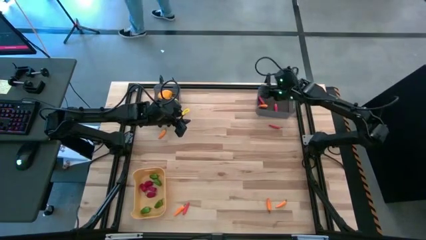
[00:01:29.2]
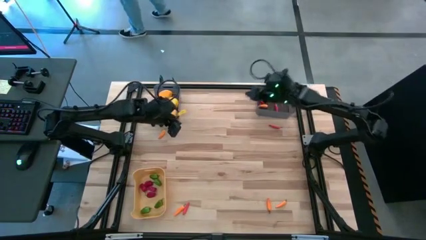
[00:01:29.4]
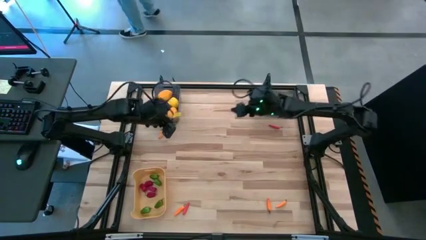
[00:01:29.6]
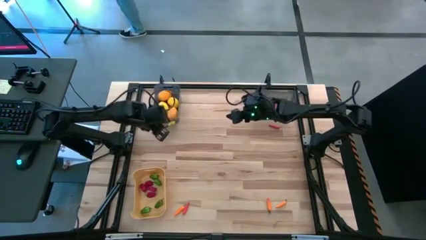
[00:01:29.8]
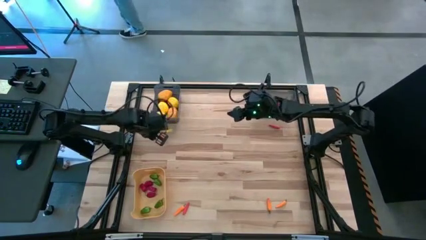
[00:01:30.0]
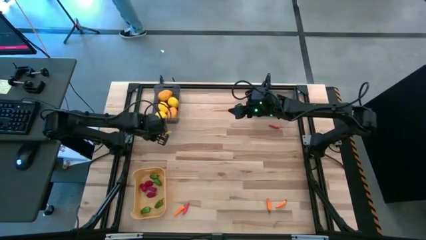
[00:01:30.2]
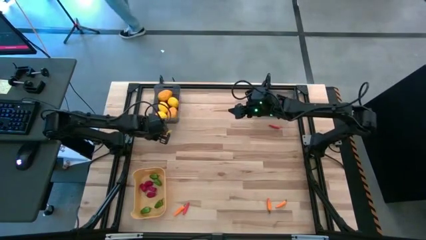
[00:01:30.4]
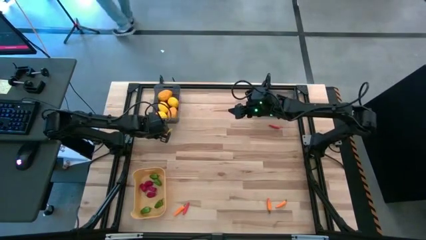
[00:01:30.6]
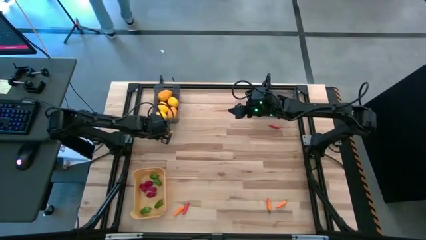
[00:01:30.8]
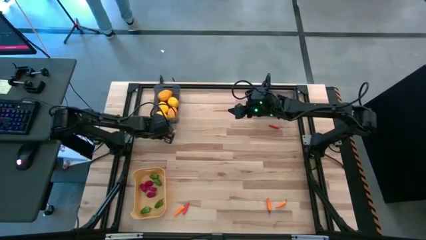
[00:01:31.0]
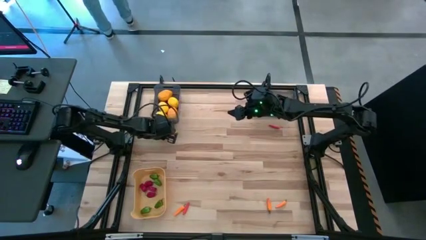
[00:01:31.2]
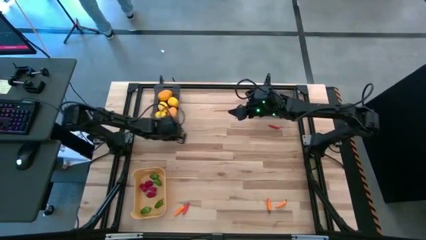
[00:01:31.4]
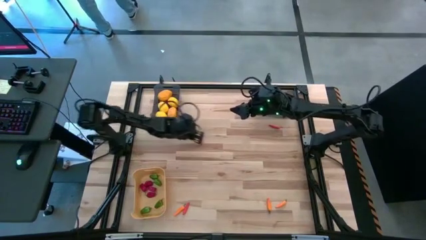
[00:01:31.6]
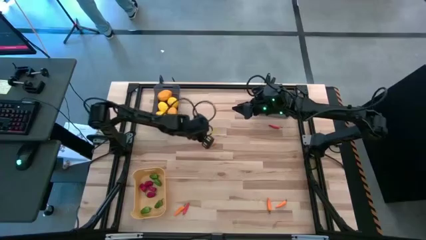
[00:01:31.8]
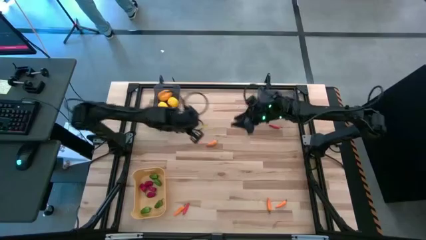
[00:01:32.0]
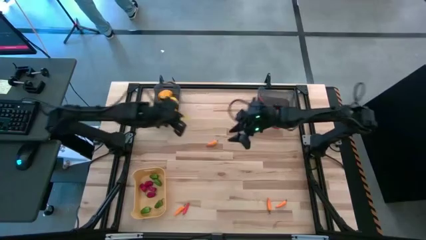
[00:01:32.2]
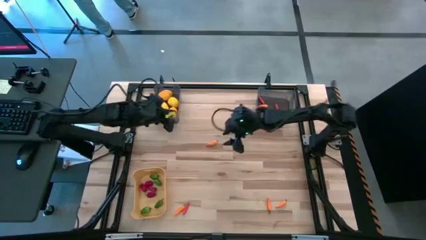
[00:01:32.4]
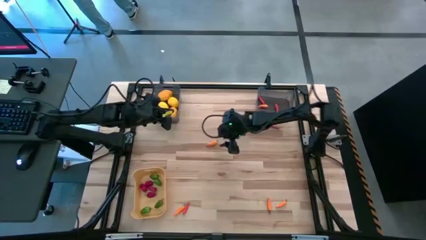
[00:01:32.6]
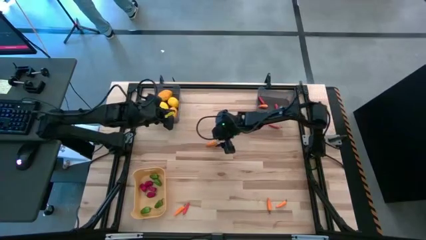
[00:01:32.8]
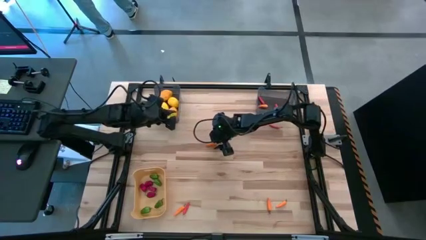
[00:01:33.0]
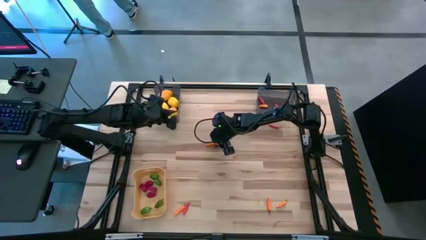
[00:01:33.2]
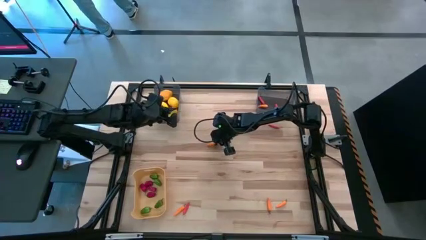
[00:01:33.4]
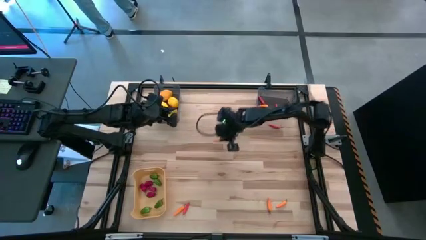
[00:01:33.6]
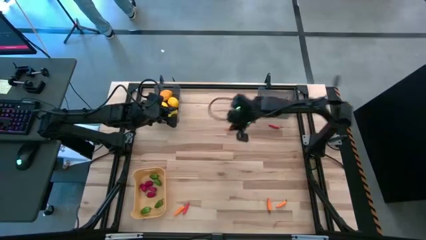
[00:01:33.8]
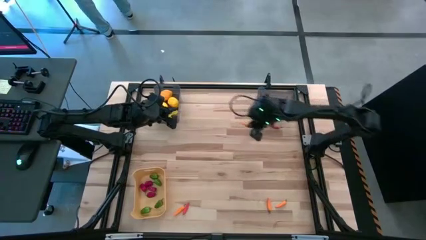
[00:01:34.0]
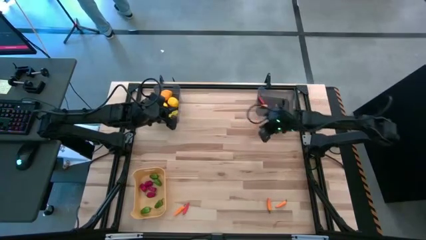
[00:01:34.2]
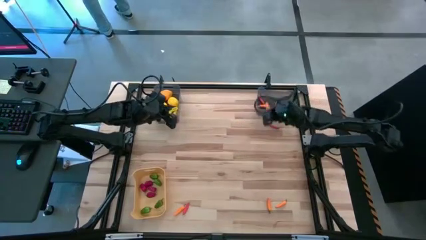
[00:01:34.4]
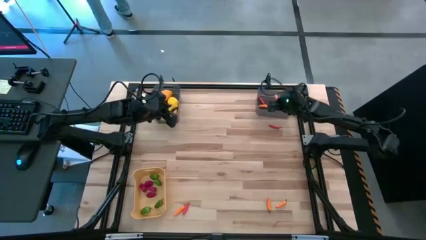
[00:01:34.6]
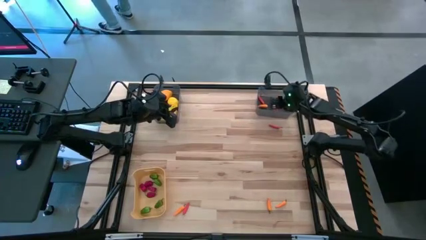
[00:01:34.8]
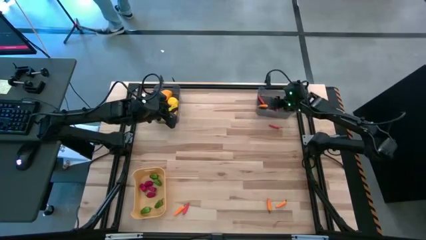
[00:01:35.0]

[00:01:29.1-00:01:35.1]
Task: Sort produce into baskets
Put the top left yellow chili into the right black bin

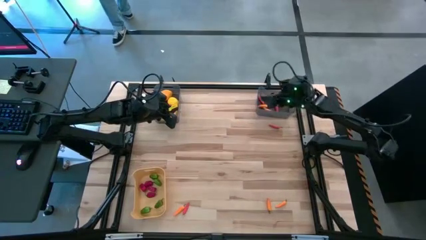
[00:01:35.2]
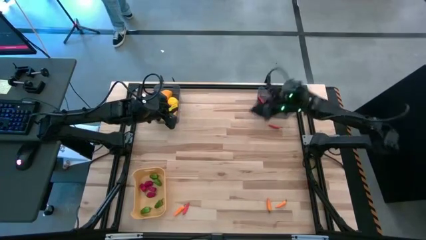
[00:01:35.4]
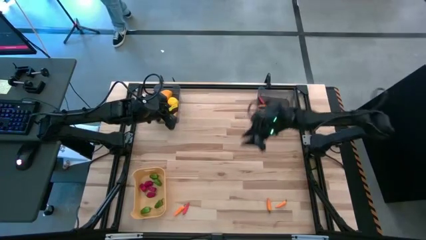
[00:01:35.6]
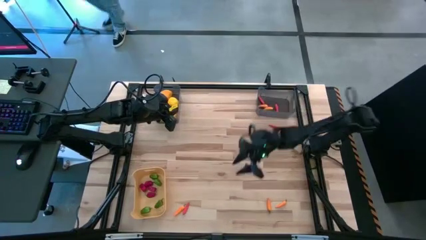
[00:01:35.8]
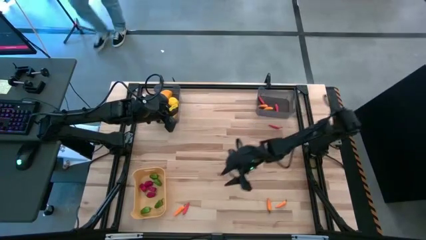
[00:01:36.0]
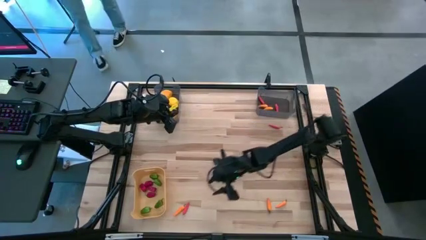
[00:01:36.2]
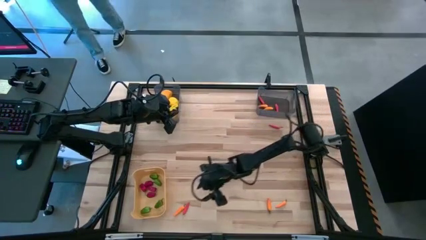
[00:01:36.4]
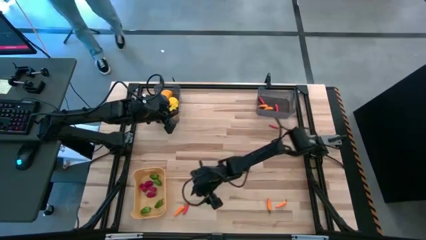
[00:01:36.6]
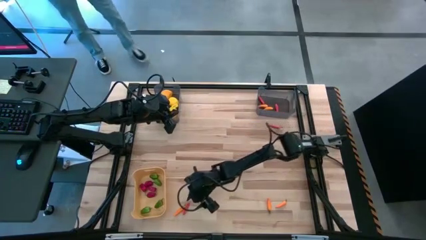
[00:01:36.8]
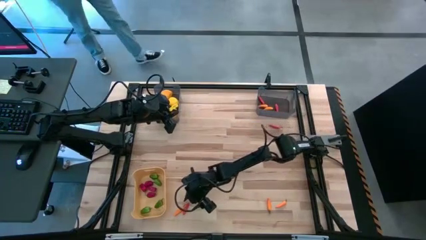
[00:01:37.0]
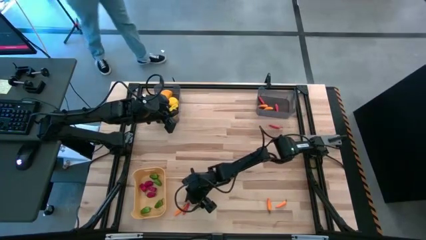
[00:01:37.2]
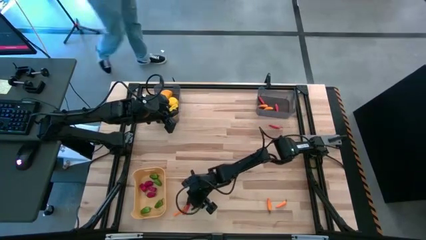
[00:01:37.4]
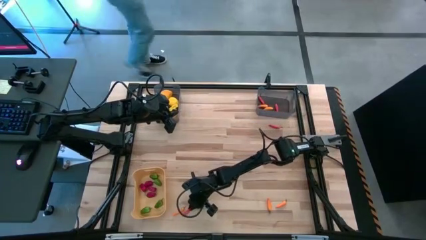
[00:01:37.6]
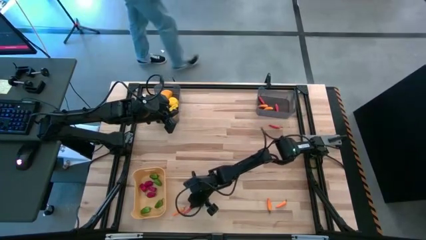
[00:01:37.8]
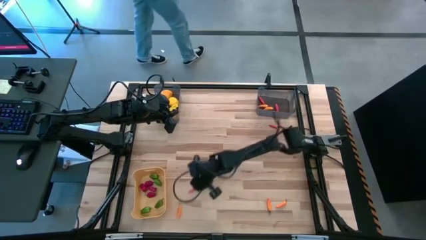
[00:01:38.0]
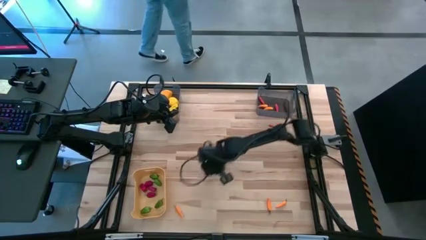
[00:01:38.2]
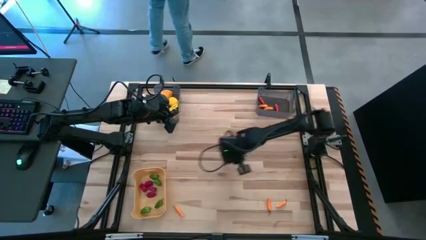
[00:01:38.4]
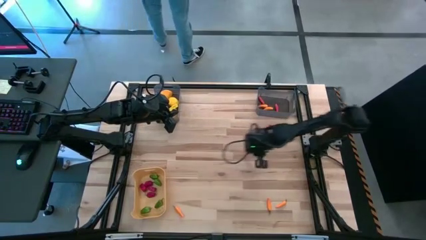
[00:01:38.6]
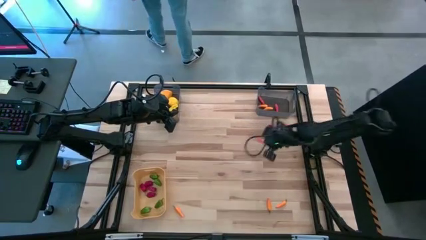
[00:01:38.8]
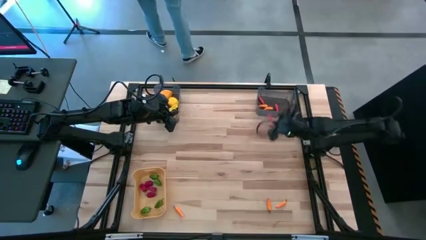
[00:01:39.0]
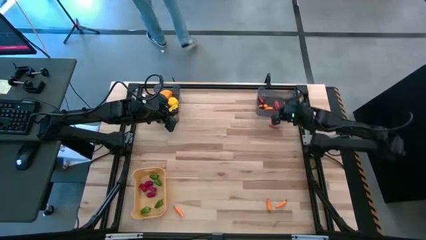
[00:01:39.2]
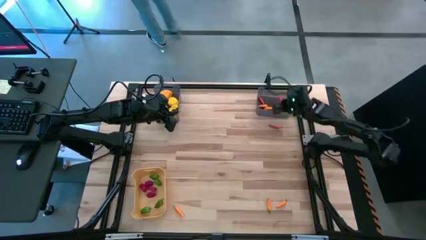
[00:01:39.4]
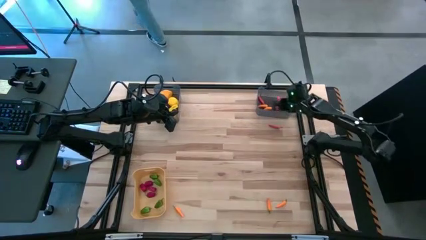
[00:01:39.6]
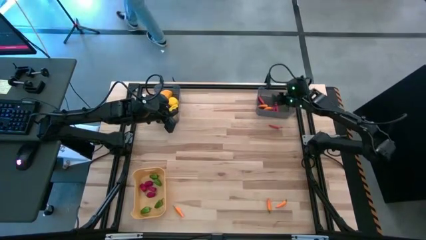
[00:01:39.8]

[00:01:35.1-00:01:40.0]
Put the bottom red chili into the right black bin

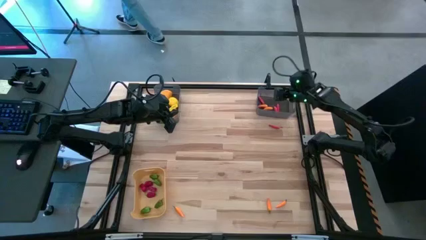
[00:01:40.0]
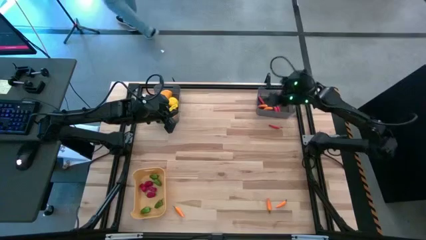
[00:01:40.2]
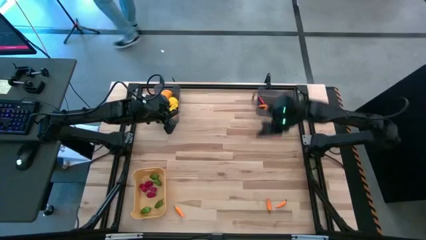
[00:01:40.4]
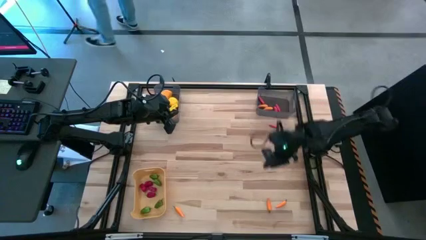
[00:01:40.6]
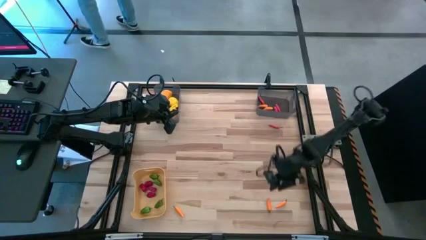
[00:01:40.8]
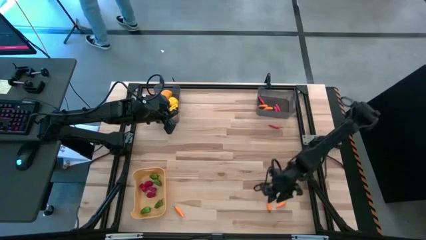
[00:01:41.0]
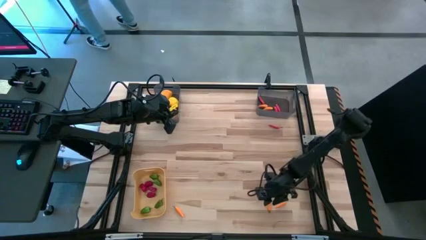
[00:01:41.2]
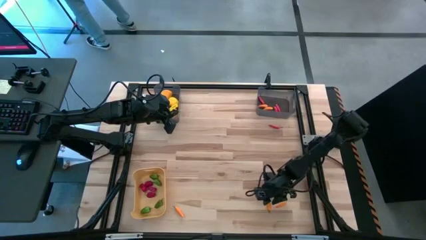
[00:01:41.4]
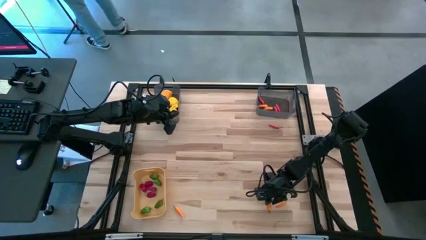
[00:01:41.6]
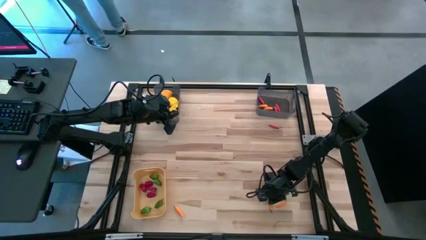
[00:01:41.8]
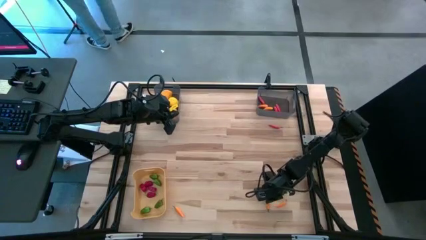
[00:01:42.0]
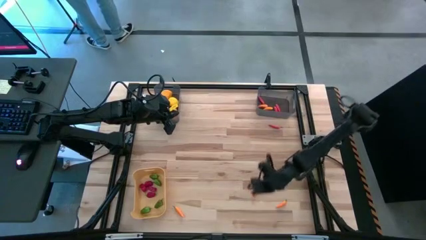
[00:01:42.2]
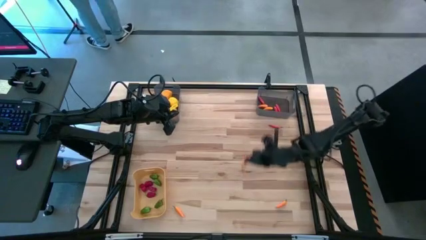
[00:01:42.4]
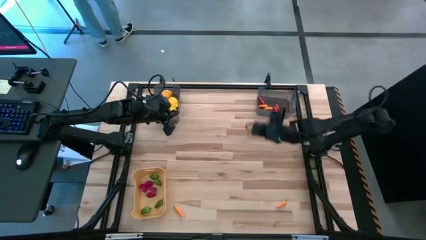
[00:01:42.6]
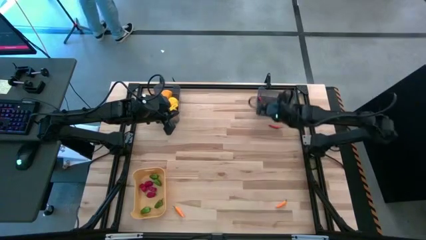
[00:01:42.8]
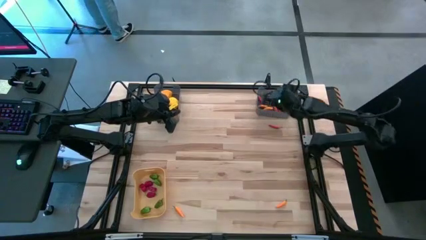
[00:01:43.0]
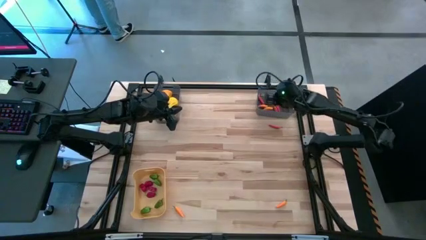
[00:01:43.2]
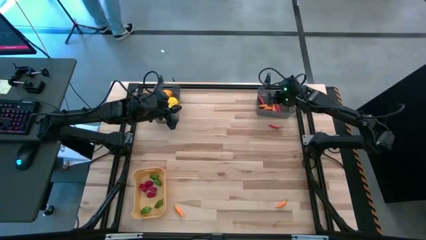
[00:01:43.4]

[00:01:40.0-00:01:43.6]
Put the center yellow chili into the right black bin

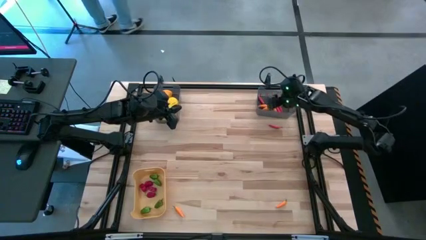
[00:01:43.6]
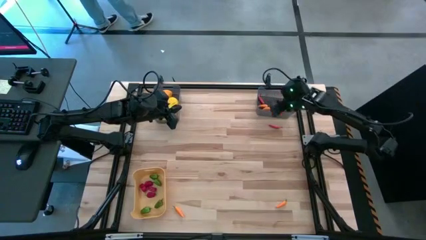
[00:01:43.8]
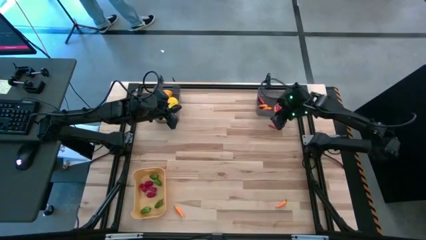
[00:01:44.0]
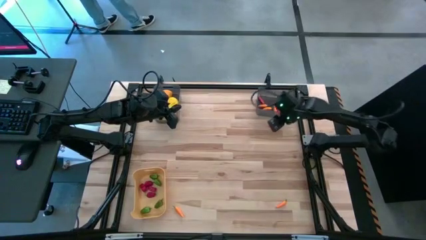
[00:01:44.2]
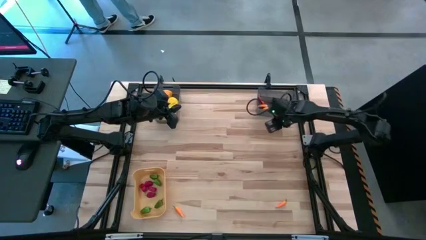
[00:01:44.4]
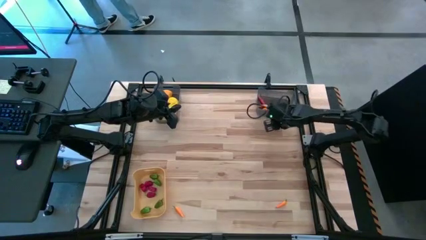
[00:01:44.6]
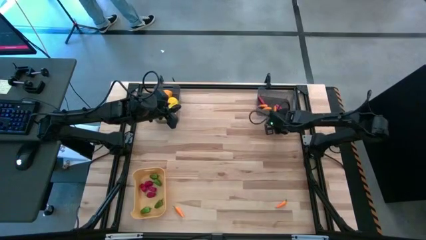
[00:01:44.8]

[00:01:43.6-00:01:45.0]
Put the red chili into the right black bin

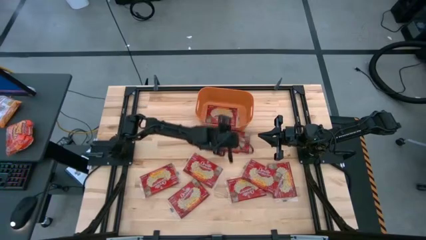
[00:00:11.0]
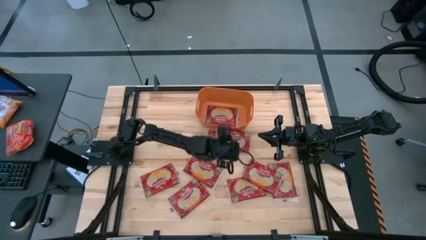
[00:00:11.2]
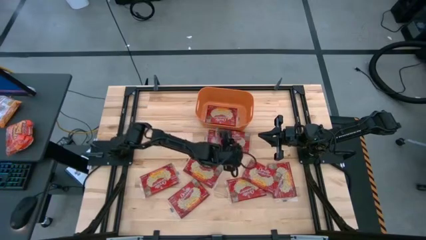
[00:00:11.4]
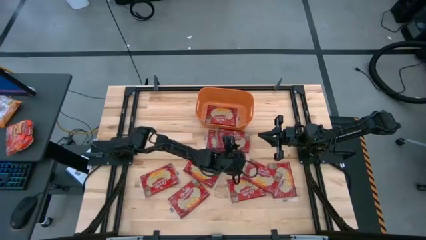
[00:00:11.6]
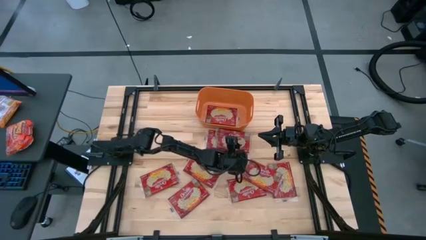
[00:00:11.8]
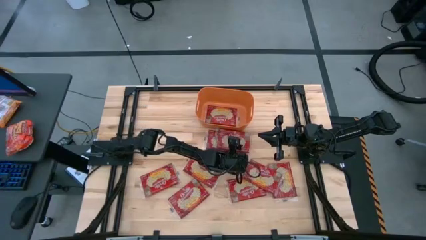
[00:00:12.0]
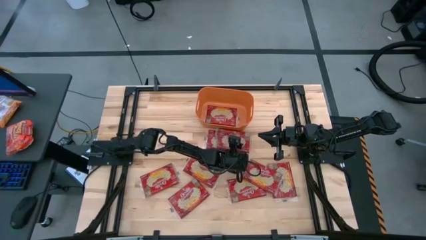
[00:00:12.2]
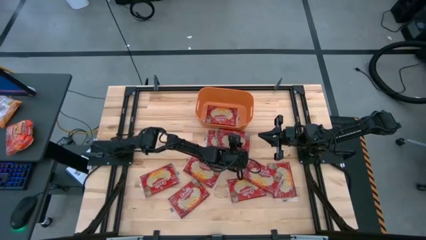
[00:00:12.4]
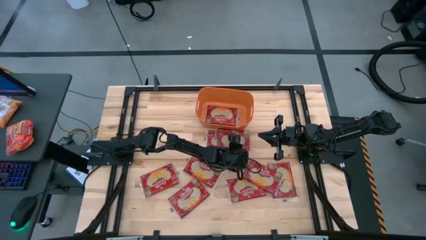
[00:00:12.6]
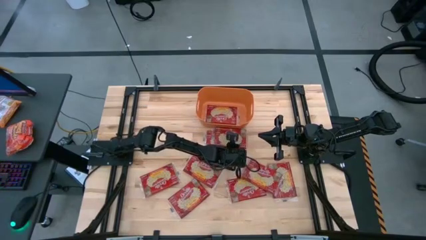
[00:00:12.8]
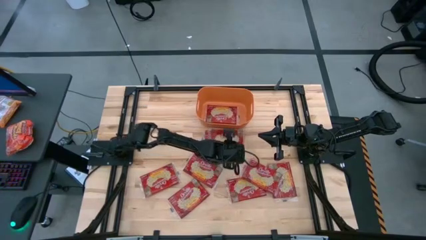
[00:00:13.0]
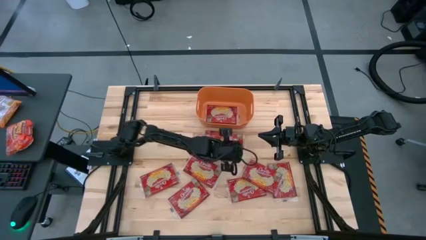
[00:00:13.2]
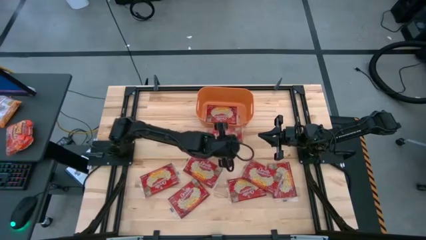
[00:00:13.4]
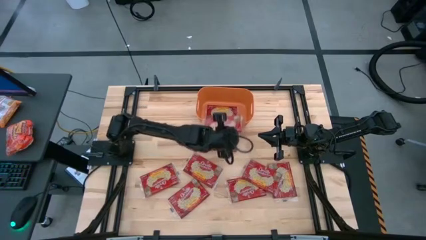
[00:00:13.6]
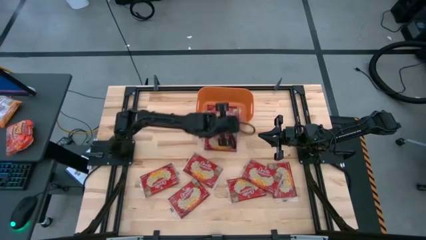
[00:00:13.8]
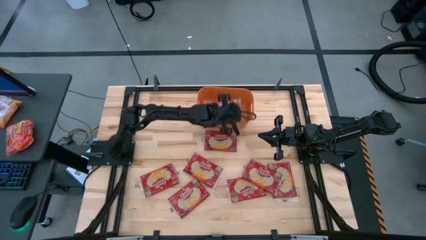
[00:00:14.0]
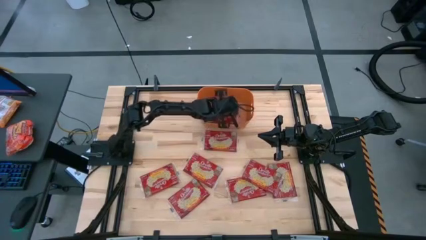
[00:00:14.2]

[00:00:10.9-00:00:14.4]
Task: Sort popcorn bags into baskets
Put the red popcorn bag into the orange bin
